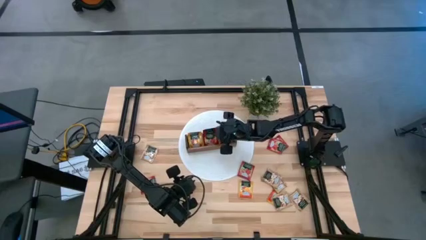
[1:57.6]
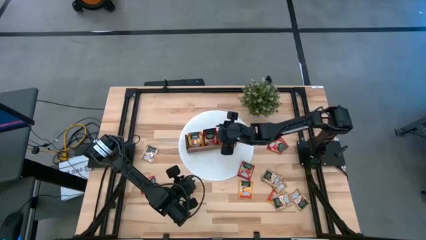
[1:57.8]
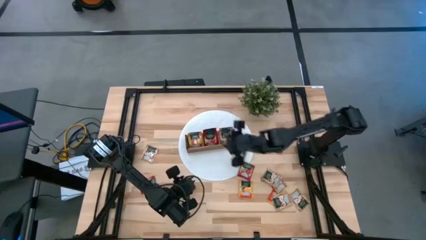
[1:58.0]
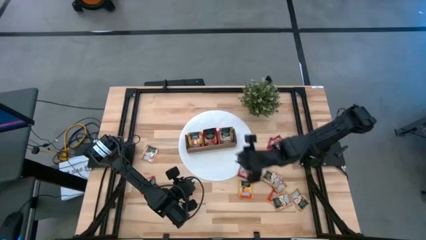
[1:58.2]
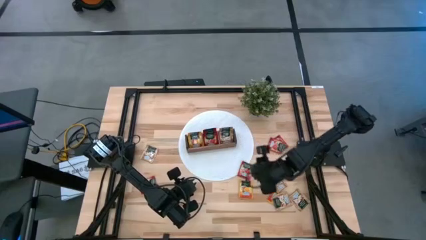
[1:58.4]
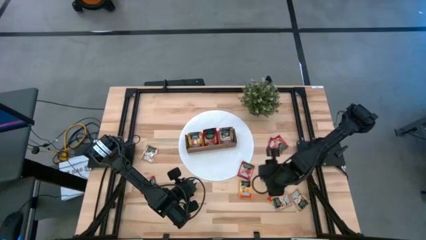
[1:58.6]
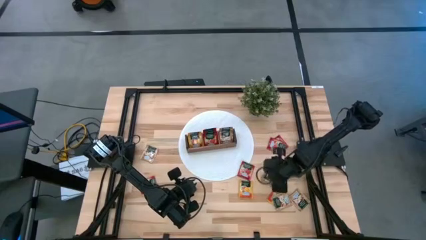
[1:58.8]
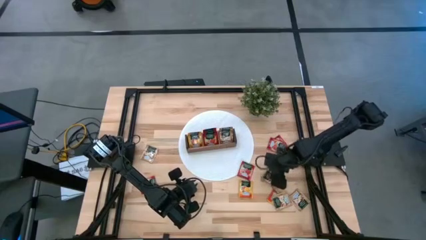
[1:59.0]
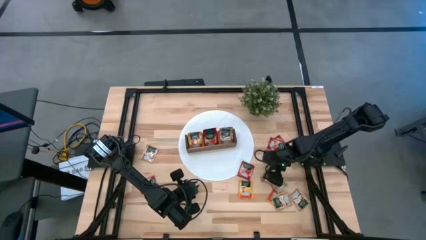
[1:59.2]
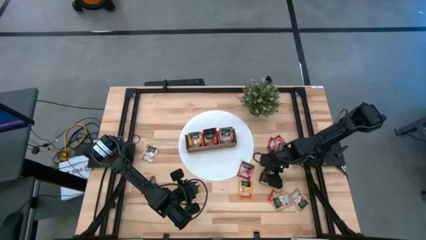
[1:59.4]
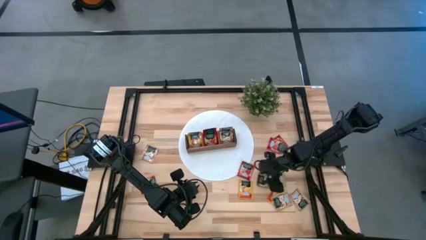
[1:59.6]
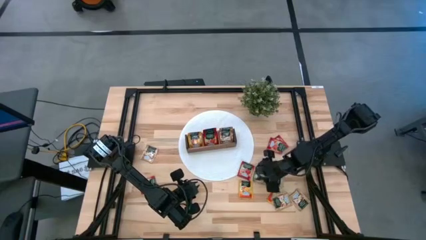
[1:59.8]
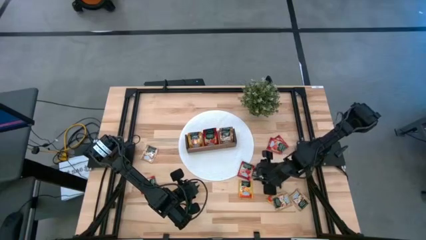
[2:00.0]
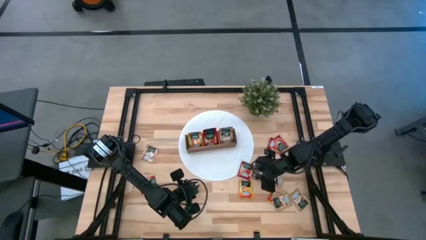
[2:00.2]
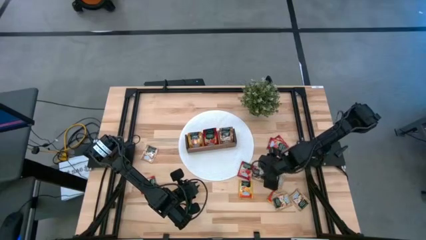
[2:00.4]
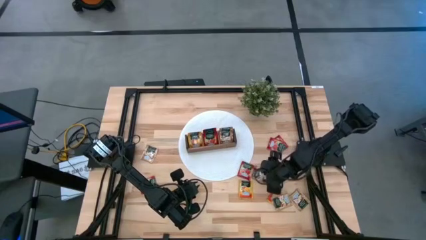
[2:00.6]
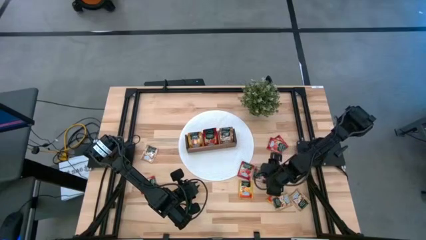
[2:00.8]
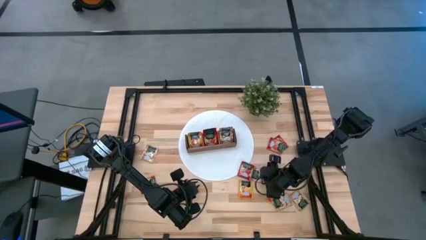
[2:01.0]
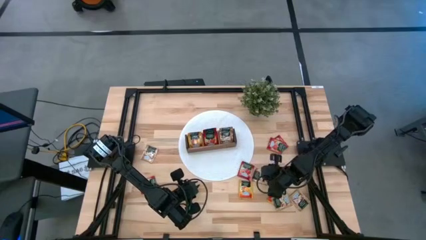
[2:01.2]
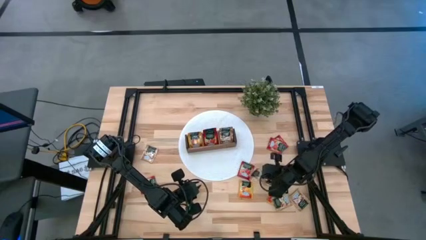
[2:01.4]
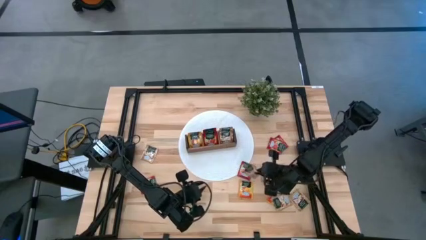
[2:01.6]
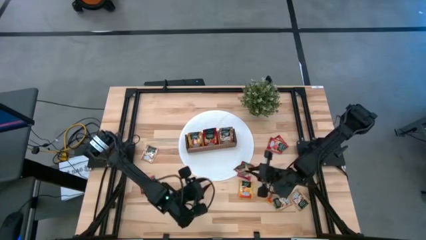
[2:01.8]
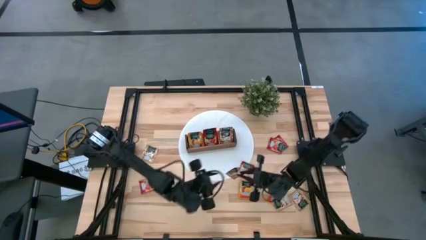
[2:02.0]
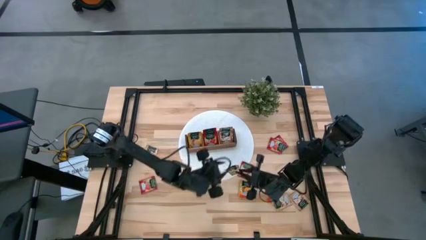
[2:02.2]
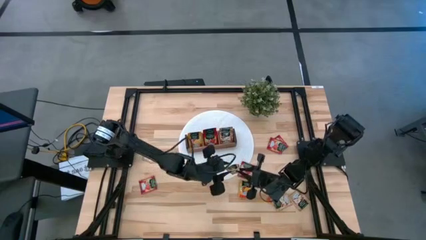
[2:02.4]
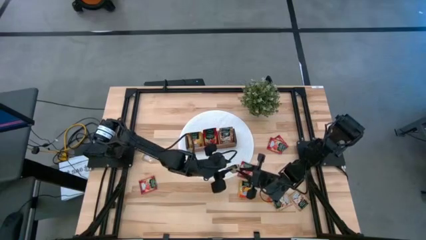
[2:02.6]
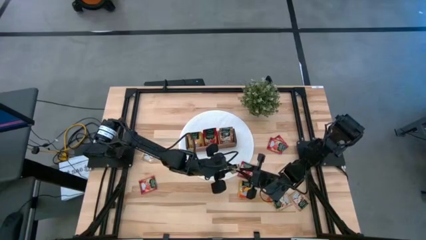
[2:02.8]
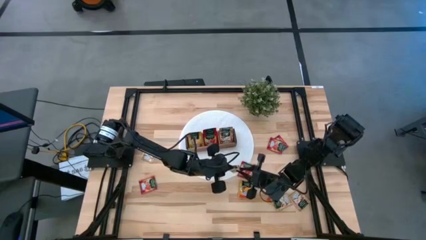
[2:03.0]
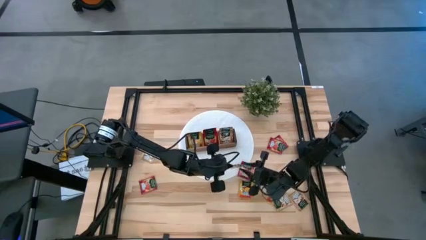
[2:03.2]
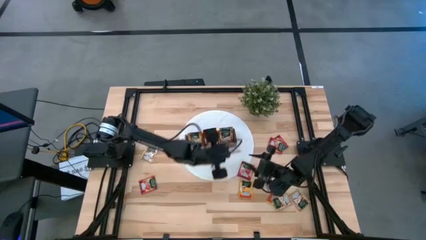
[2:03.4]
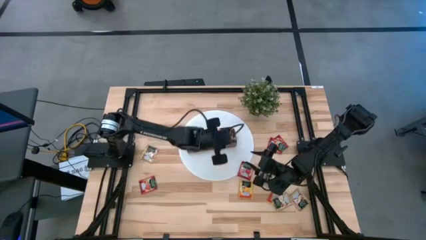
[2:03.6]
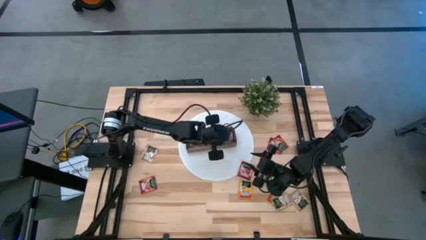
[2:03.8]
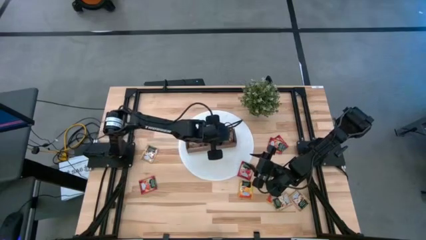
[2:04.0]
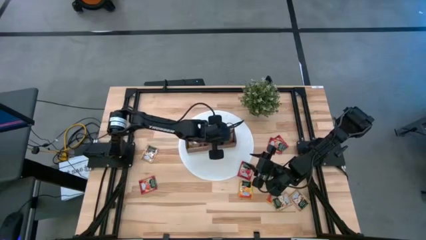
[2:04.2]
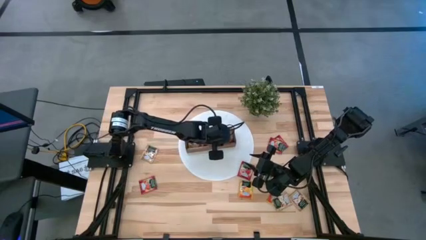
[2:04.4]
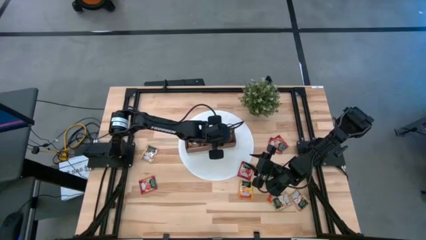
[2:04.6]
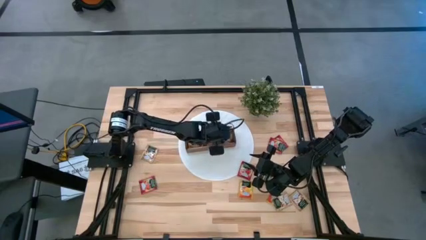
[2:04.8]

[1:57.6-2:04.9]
Task: Pick & Place Tea
Put the brown tea bag into the right section of the wooden organizer

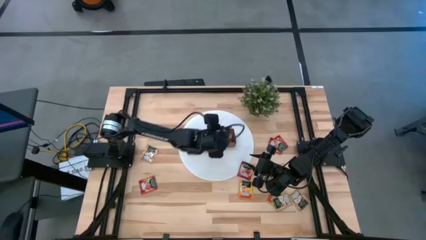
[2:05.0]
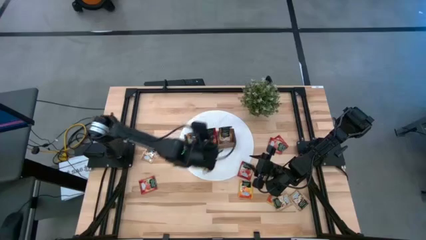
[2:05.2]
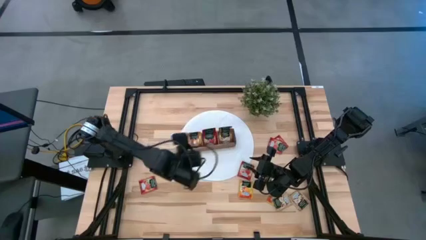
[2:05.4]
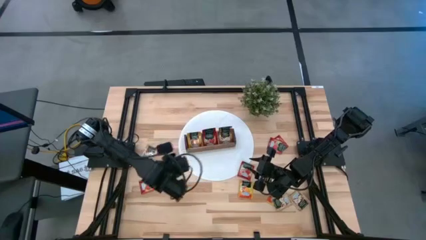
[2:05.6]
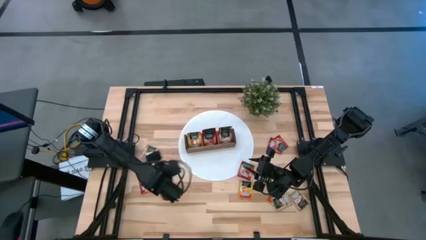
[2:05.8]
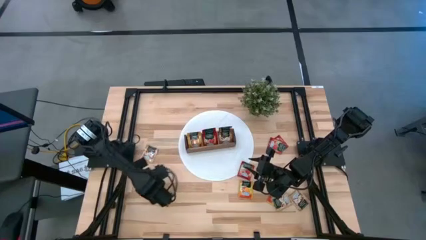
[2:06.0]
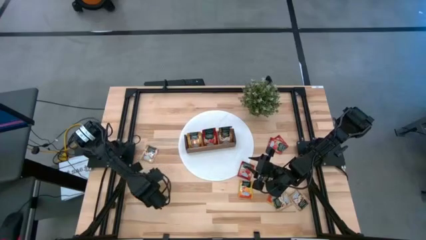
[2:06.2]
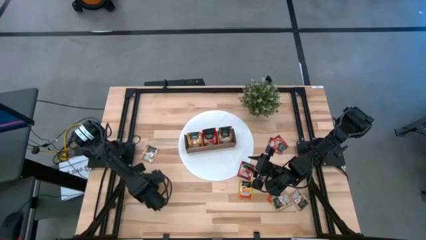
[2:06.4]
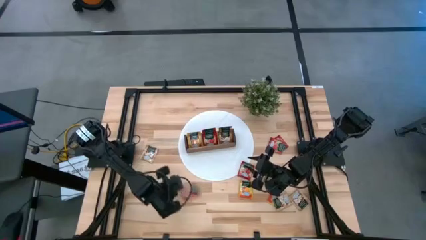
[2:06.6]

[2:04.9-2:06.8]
Put the red tea bag into the middle section of the wooden organizer

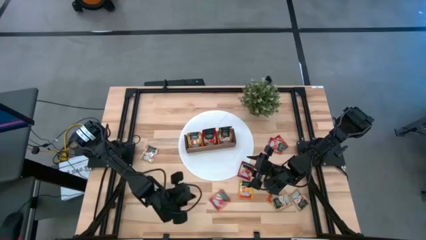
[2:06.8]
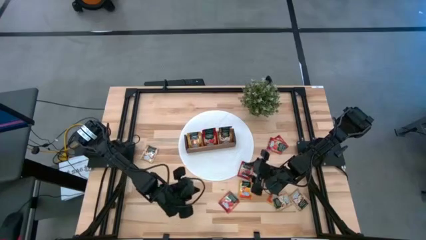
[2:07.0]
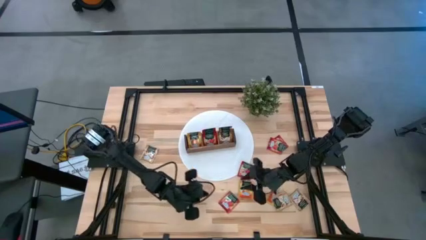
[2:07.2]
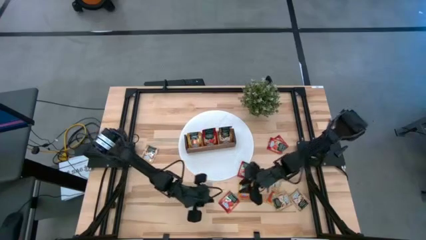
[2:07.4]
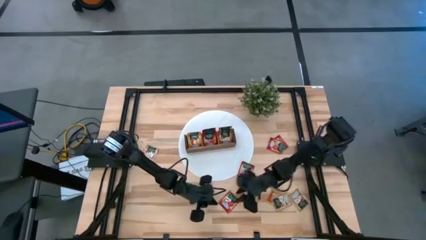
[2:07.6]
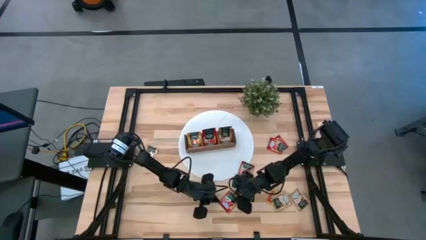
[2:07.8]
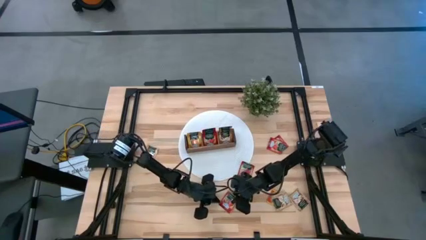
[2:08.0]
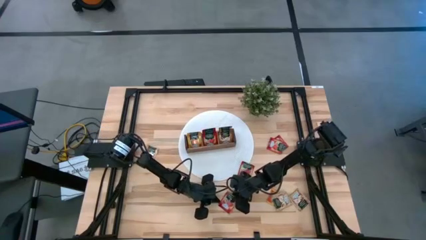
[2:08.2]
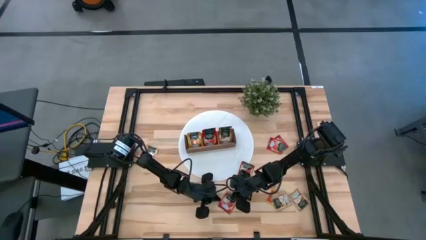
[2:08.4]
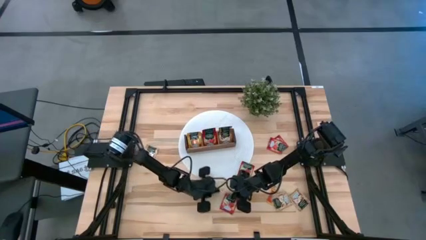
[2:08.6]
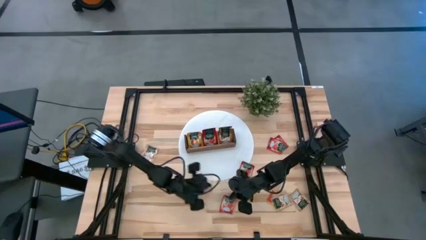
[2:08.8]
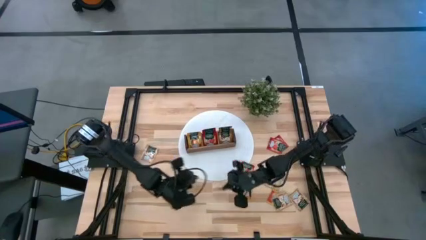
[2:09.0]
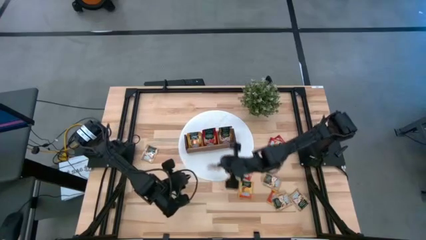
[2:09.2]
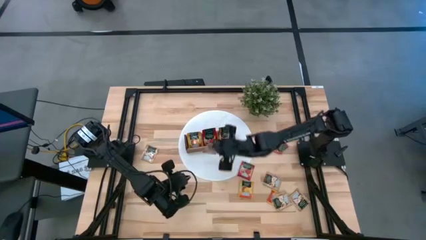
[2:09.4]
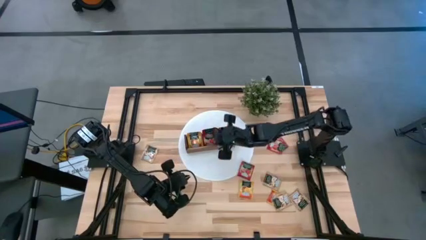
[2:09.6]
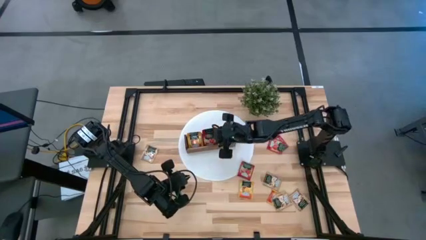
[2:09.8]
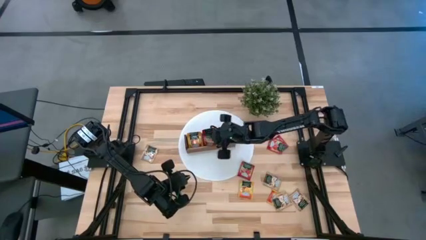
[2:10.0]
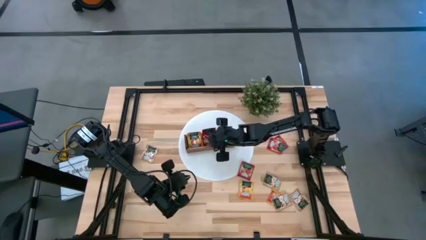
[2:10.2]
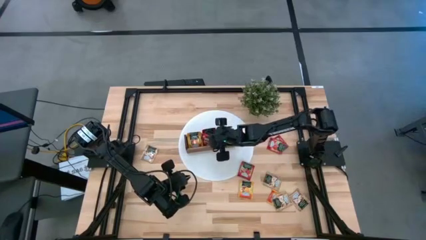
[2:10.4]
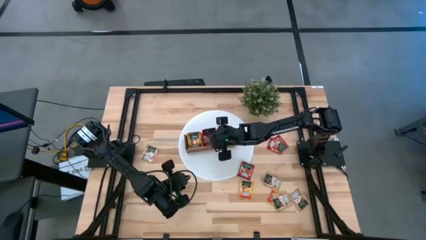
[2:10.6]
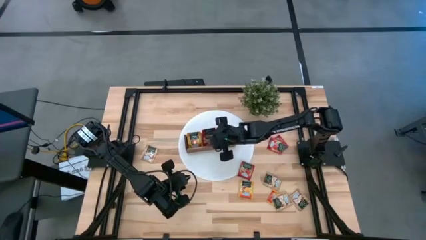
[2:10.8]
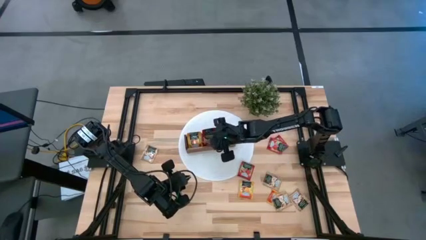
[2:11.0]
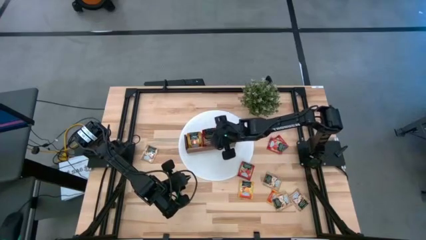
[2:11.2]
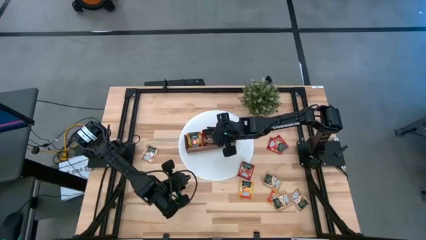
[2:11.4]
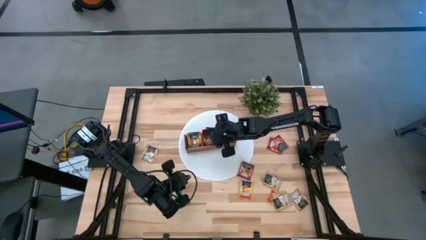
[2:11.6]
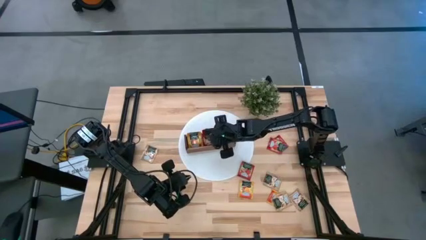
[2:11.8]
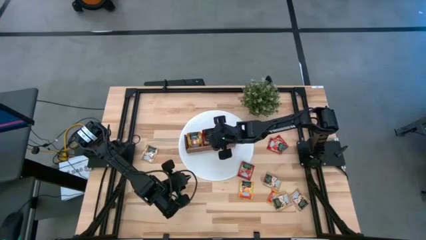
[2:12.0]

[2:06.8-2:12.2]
Put the red tea bag into the middle section of the wooden organizer
